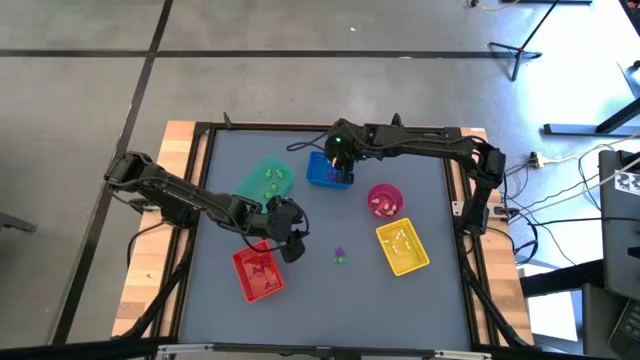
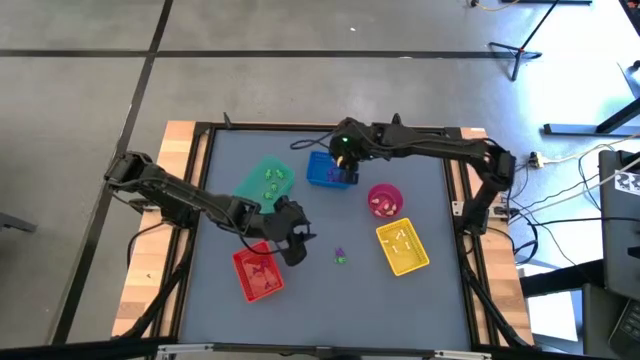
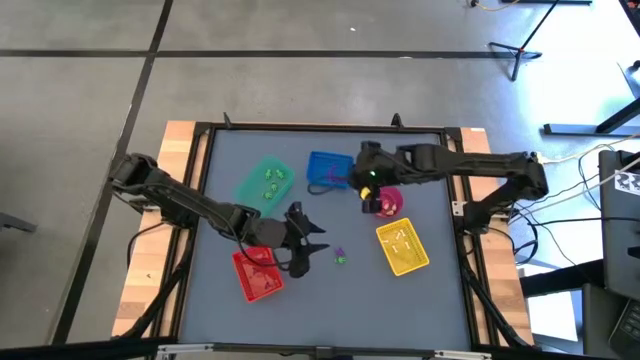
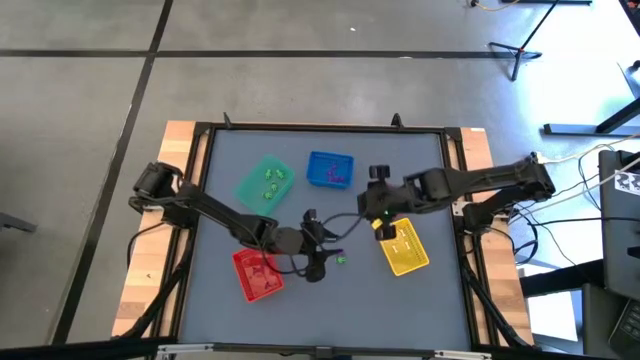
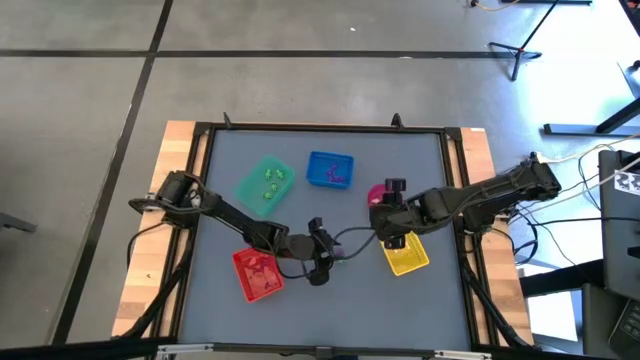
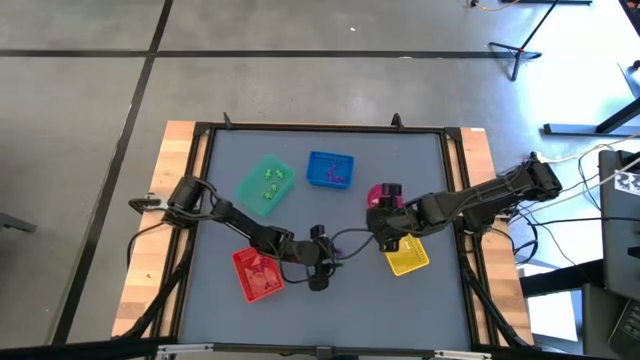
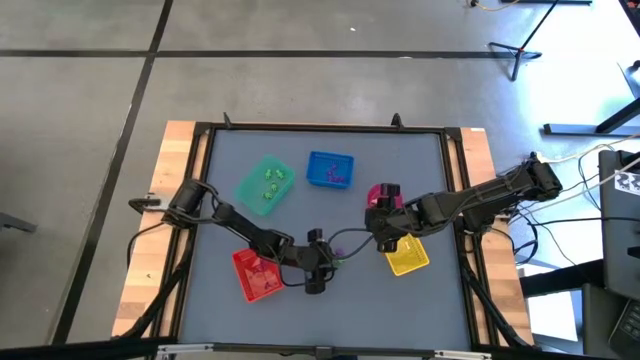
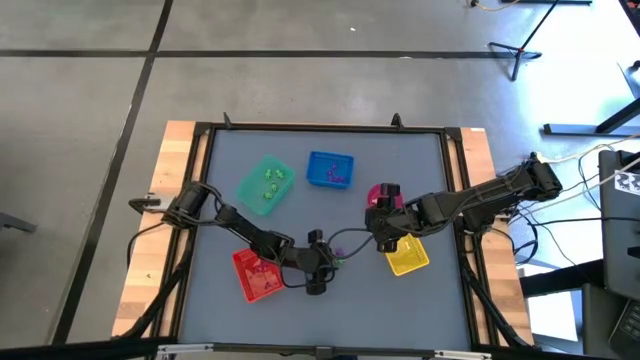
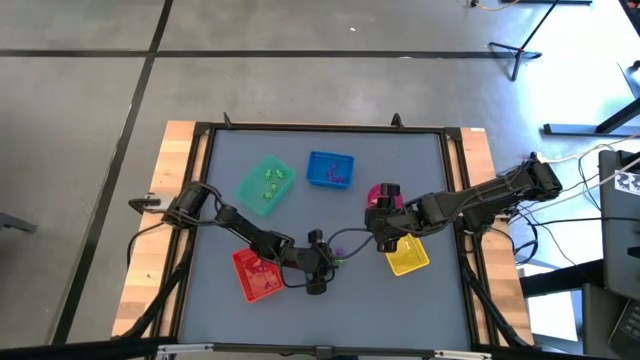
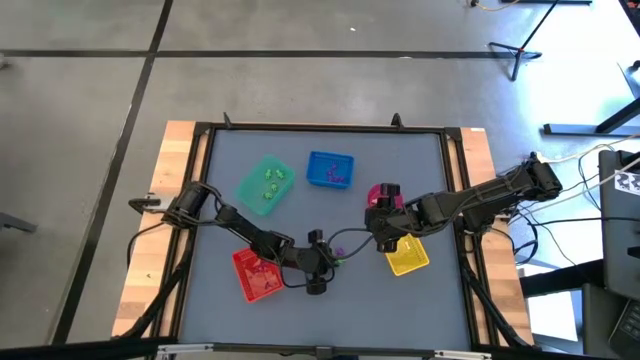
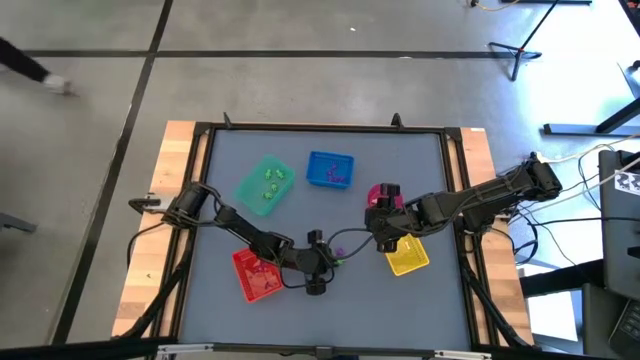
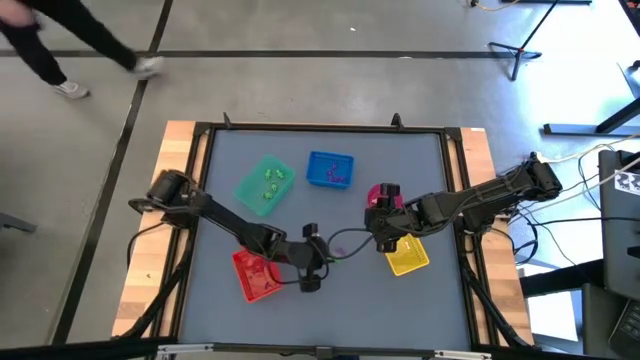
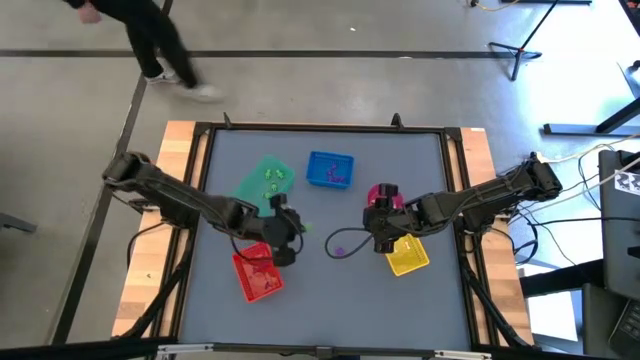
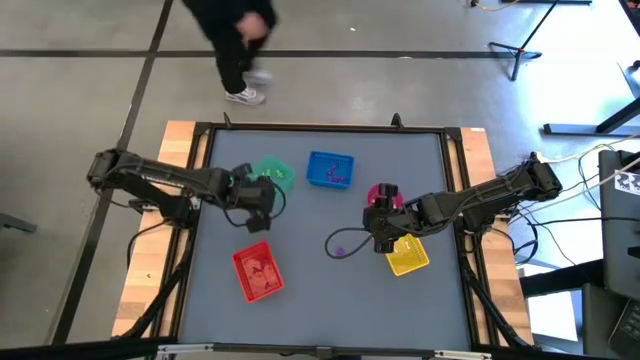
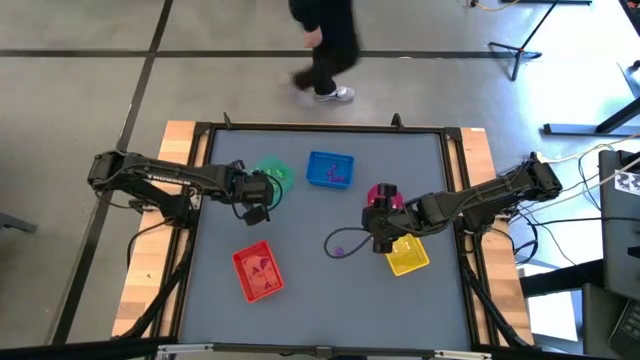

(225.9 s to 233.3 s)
Task: Sort Halloween decoration
Put the green skeleton toy into the green bin

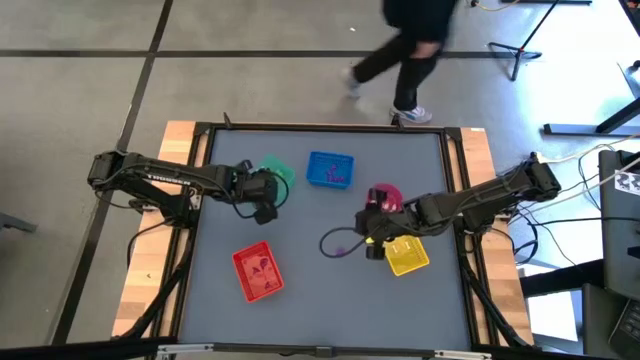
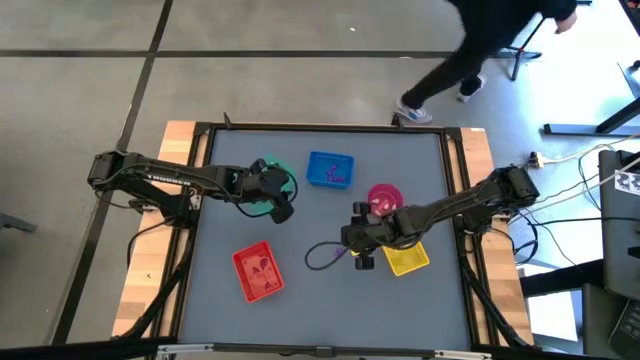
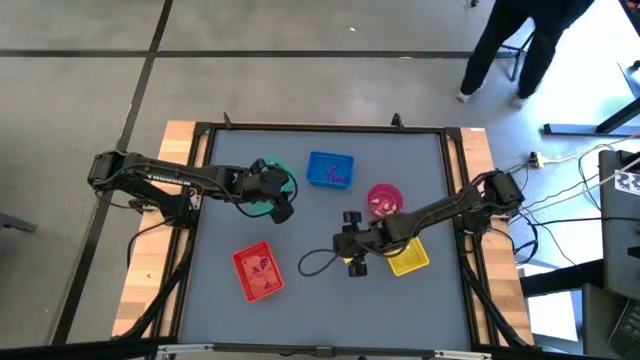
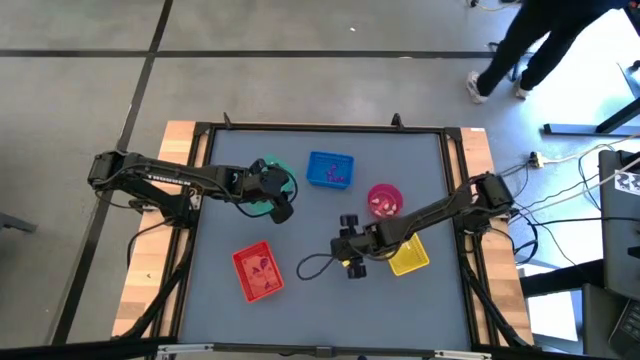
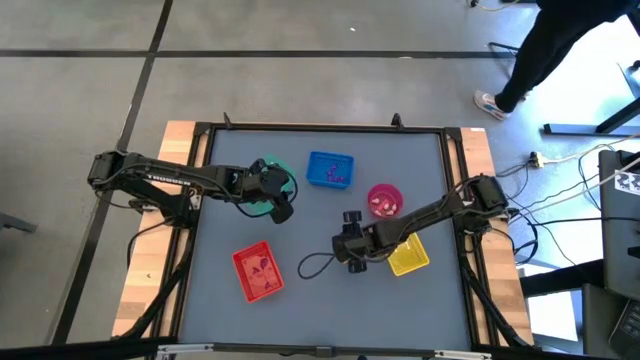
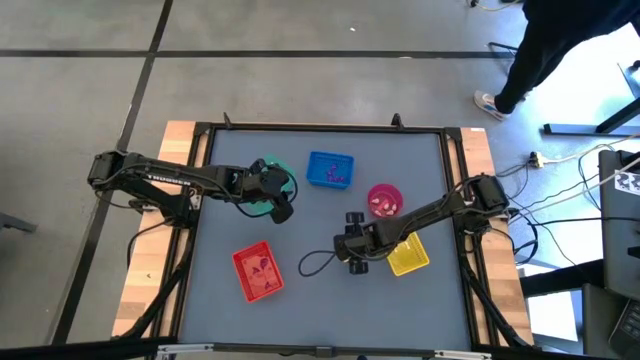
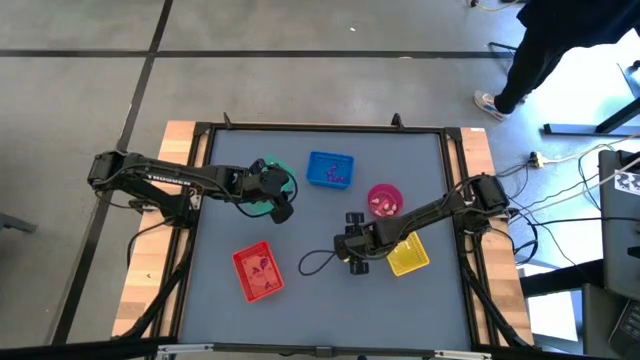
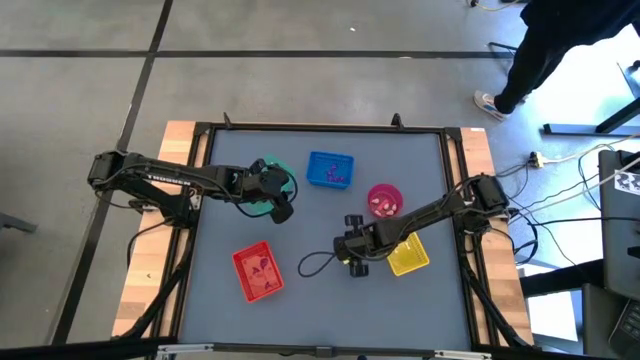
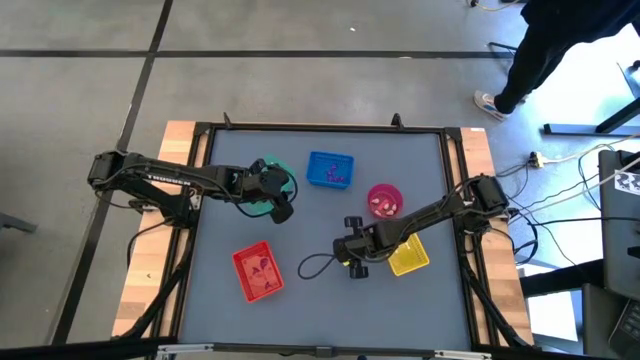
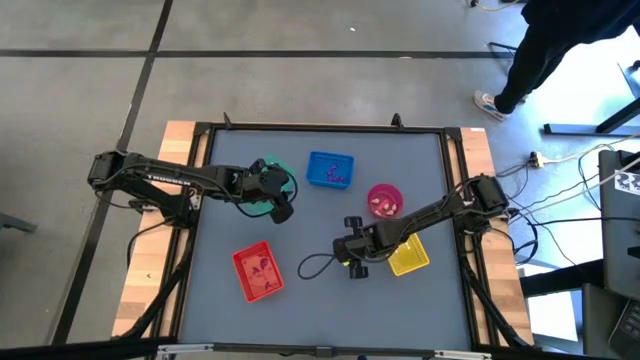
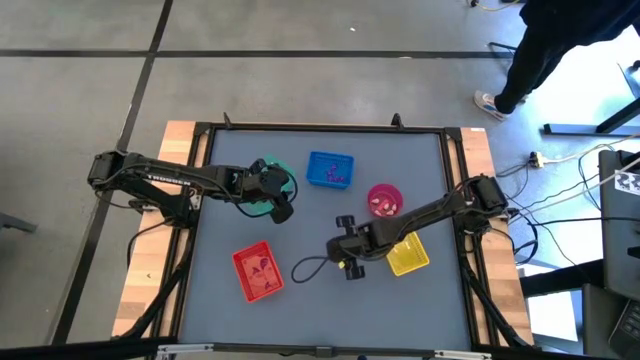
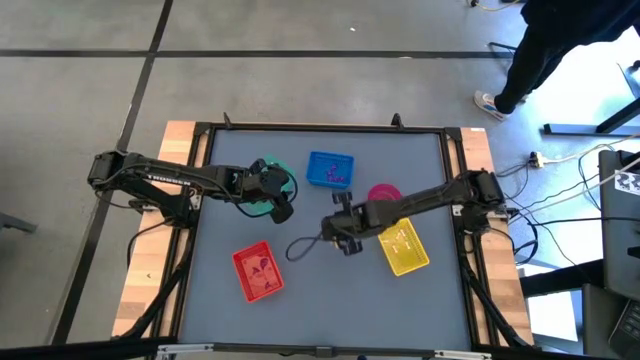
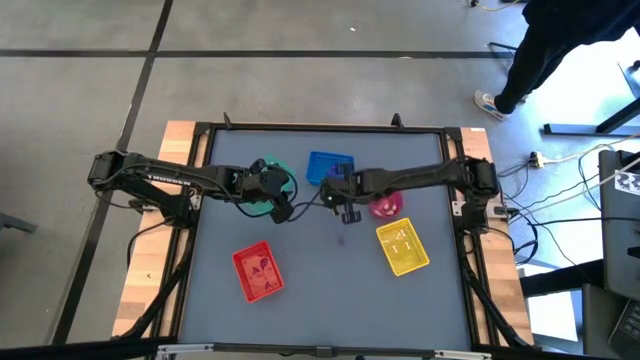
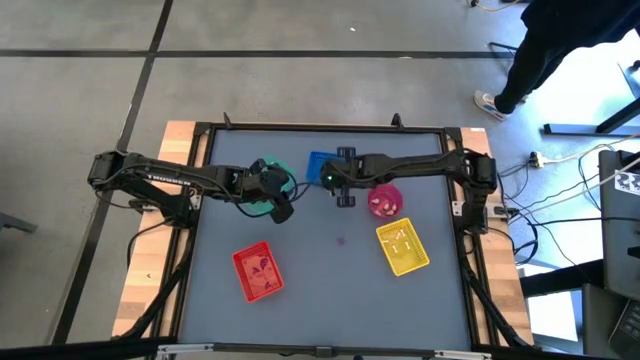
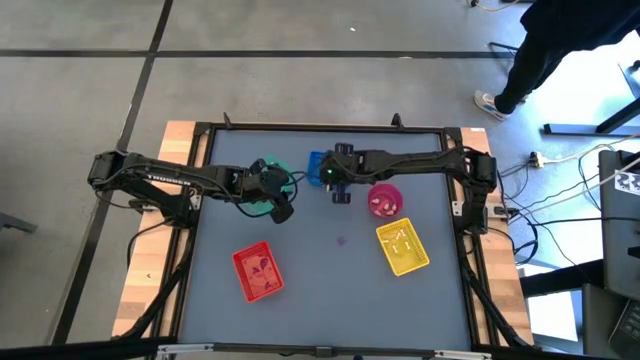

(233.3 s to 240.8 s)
Put the purple spider toy into the blue bin

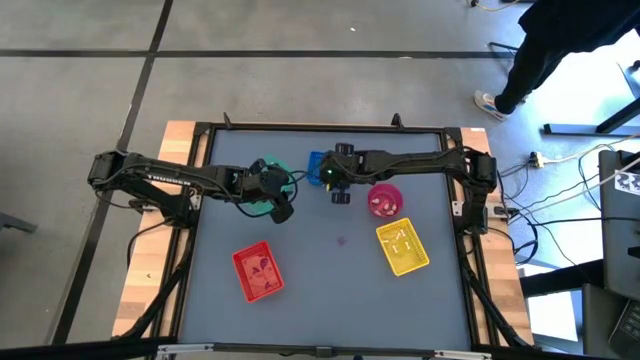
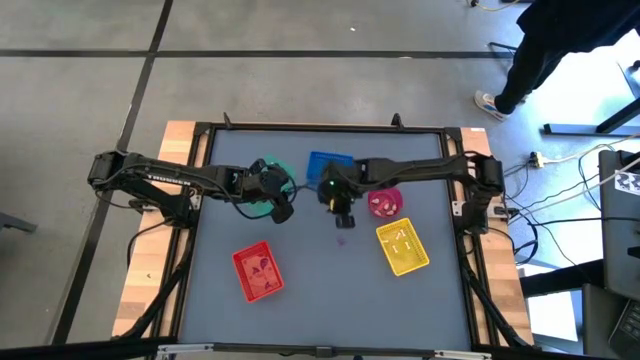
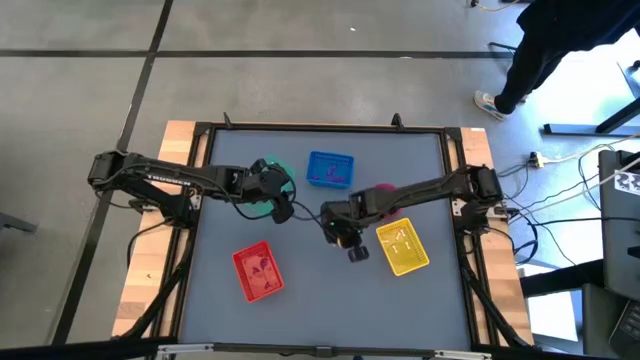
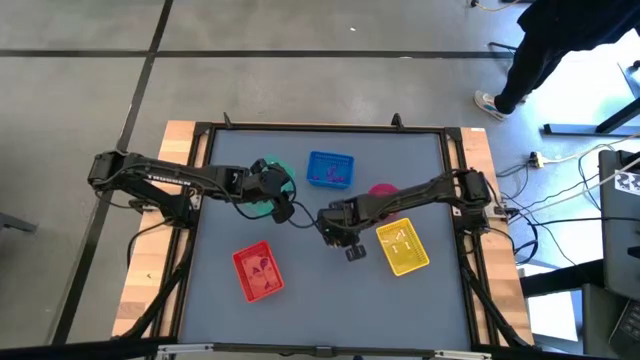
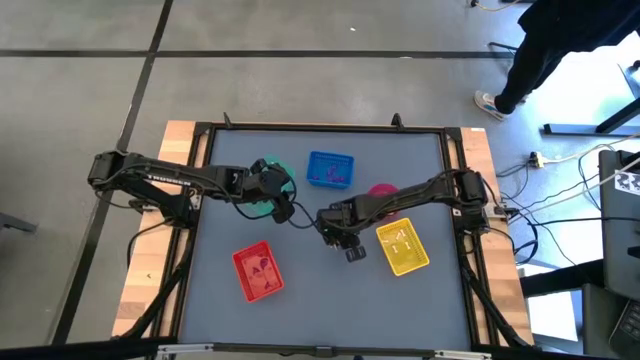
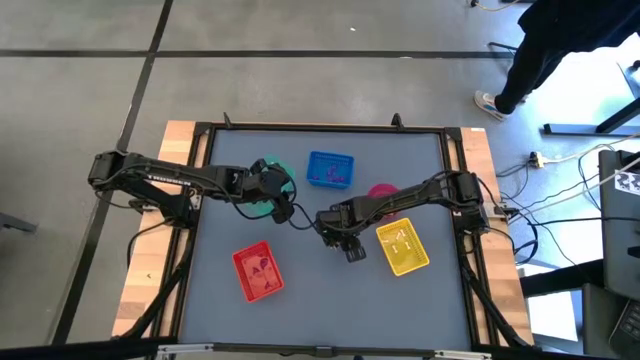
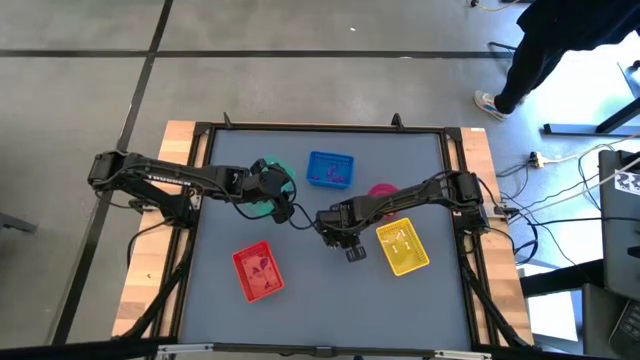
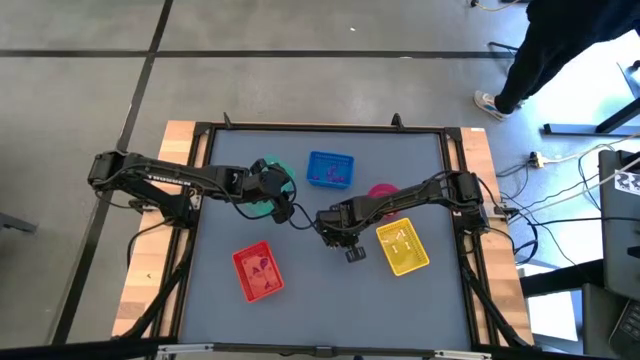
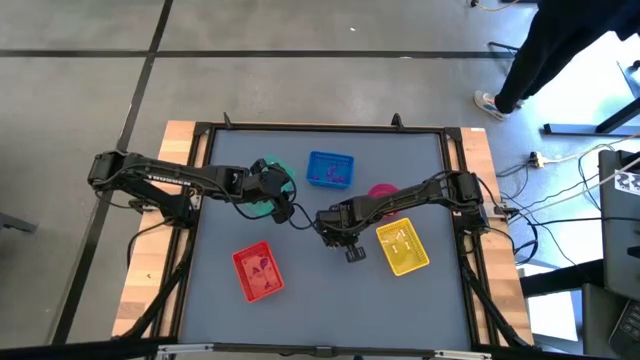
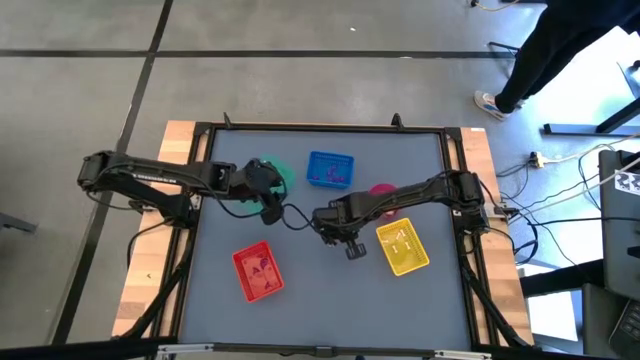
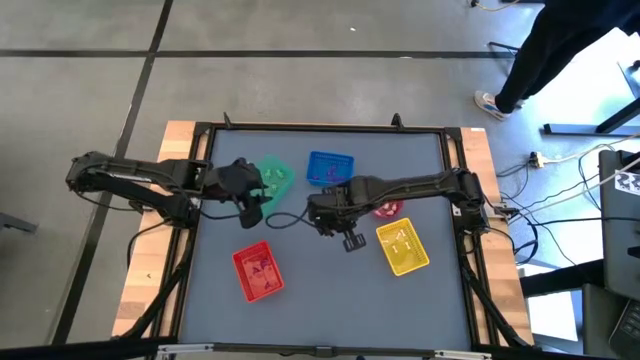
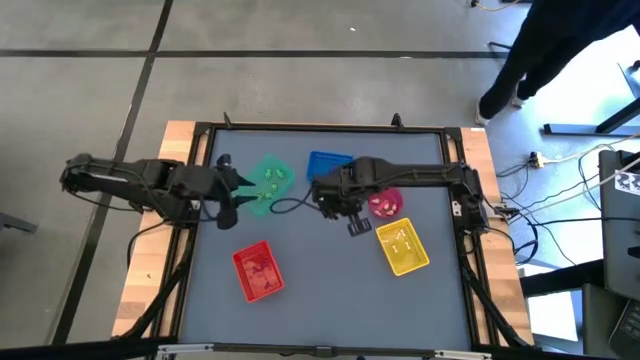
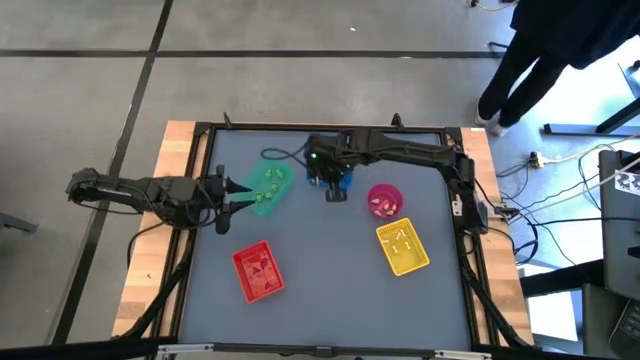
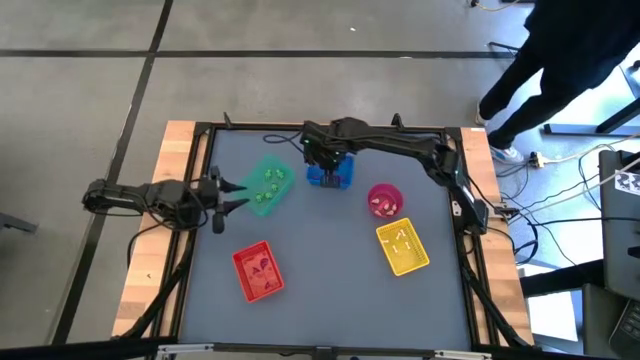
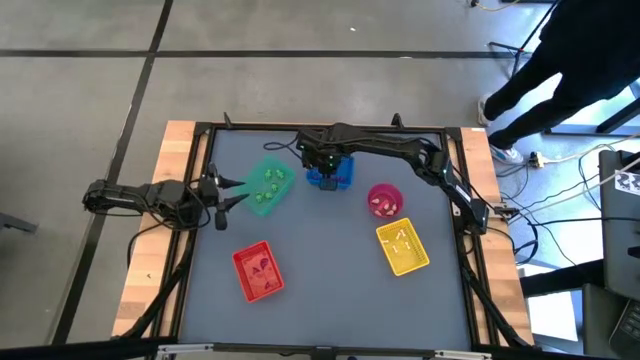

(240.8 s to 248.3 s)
Put the purple spider toy into the blue bin
